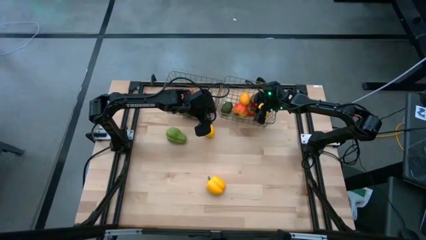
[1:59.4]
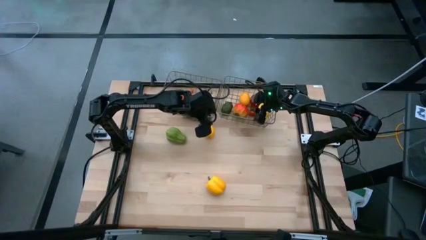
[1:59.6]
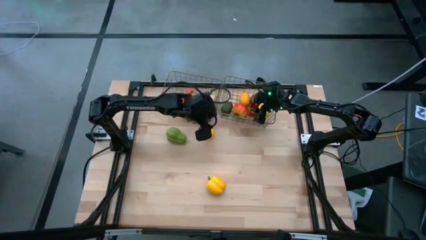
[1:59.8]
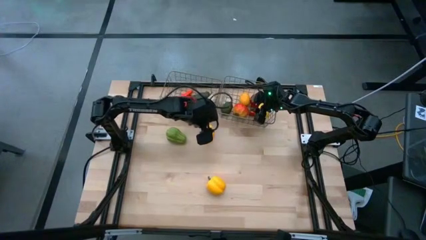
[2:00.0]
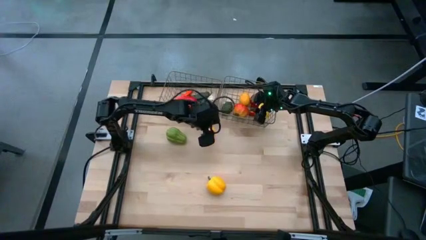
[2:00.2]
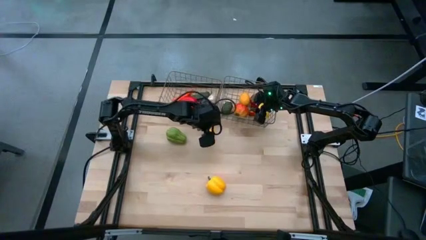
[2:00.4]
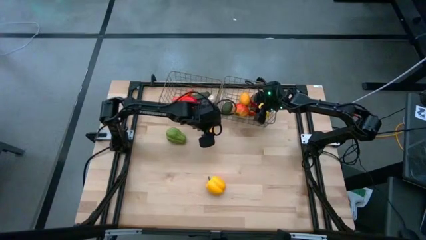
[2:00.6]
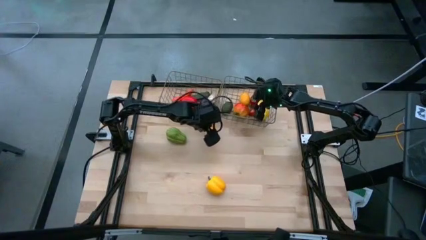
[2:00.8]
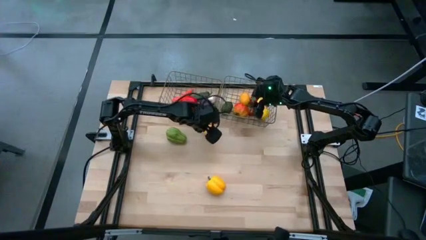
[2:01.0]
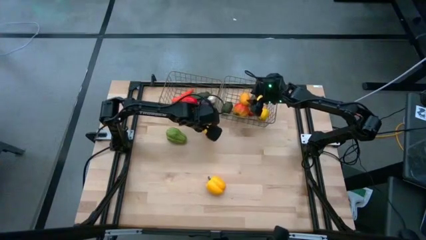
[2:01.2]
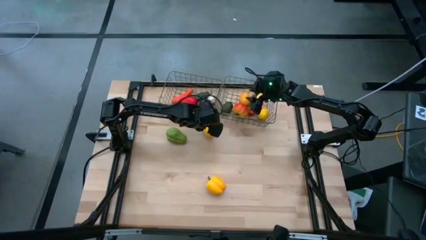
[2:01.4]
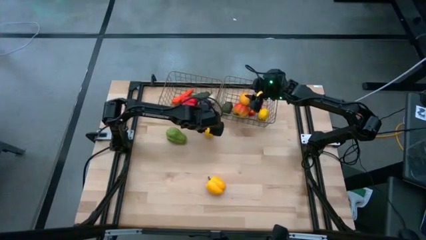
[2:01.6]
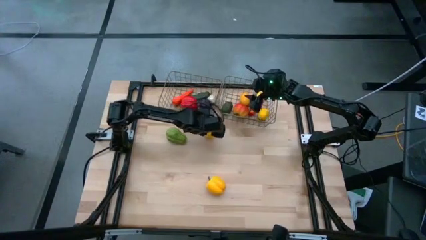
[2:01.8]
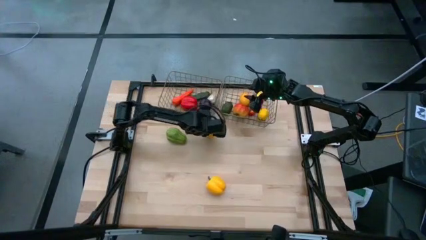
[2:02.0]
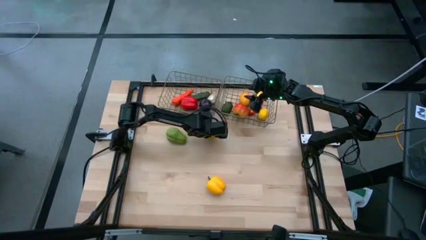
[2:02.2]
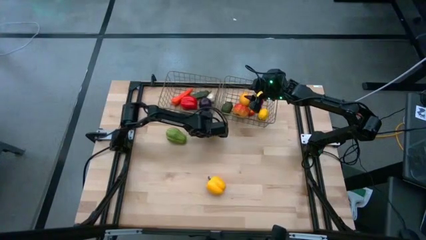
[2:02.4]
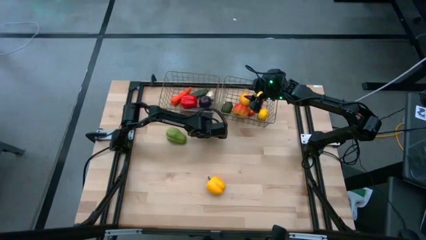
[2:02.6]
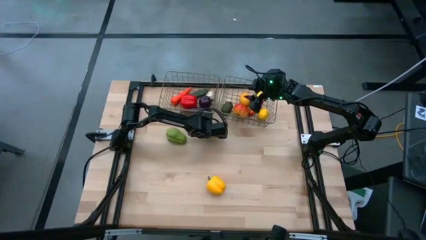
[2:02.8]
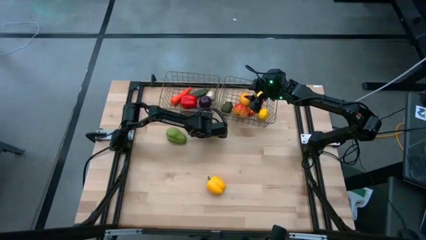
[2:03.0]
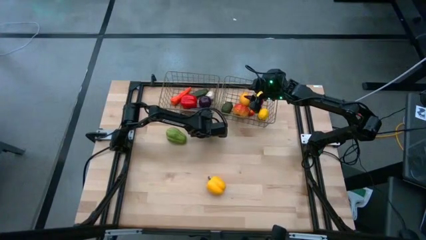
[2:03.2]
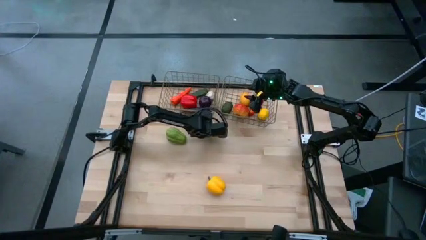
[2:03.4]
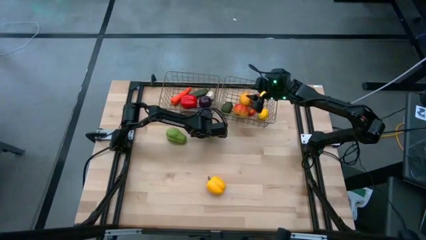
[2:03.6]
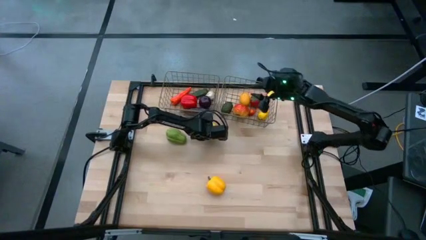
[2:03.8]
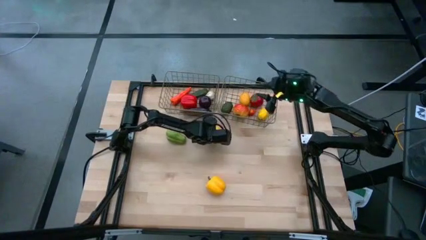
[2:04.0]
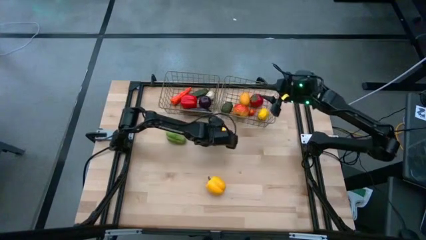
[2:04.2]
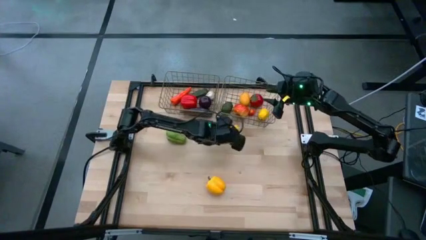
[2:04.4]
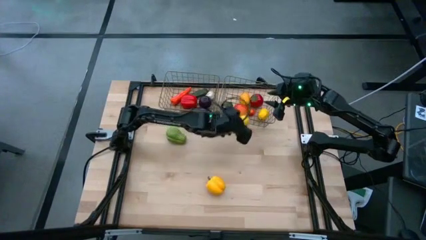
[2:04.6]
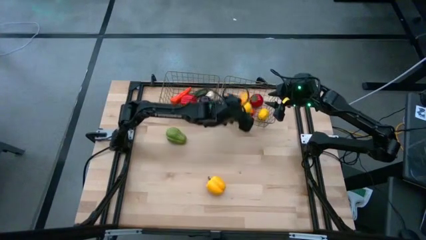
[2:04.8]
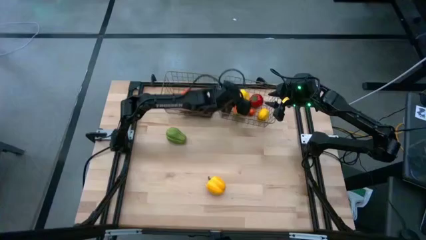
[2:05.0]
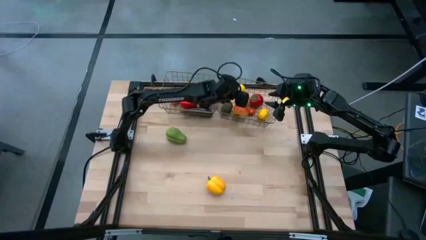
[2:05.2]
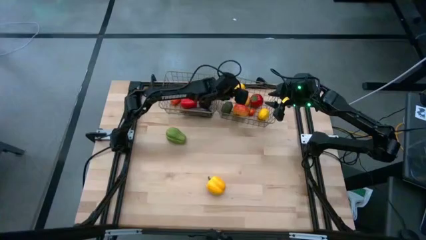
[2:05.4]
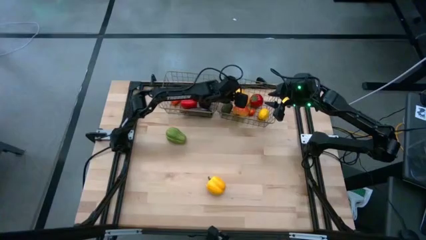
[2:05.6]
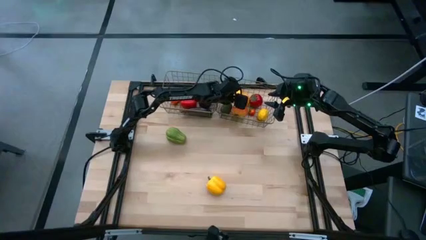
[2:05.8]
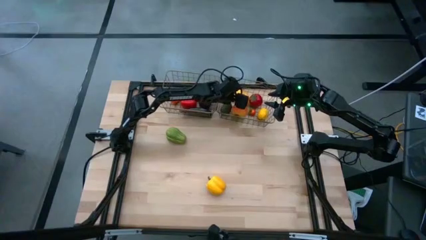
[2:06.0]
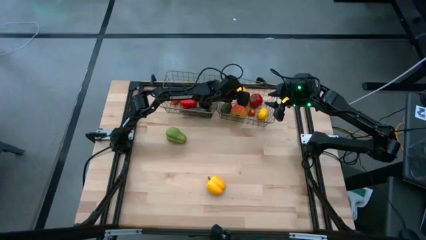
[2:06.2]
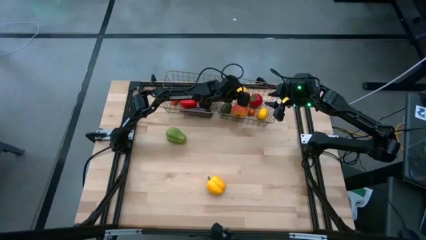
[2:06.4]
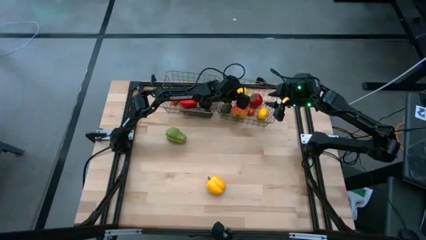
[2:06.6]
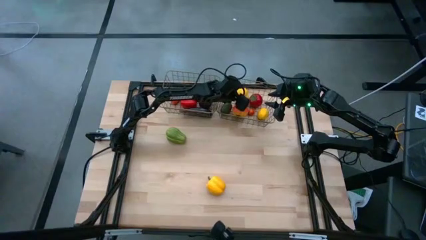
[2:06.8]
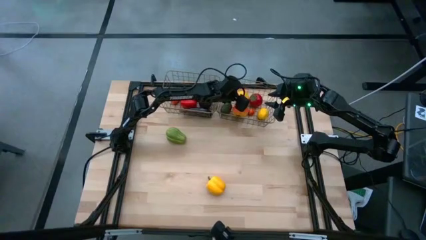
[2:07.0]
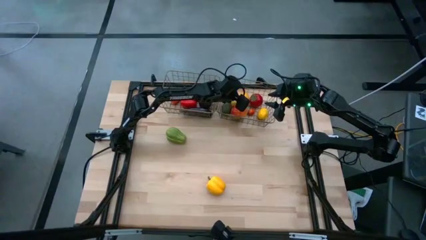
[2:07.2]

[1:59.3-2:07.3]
Task: Sort produce into baskets
Put the yellow lemon into the right golden wire basket

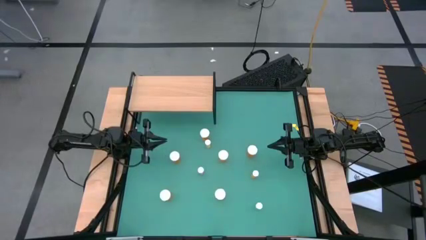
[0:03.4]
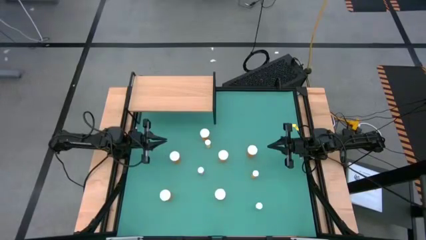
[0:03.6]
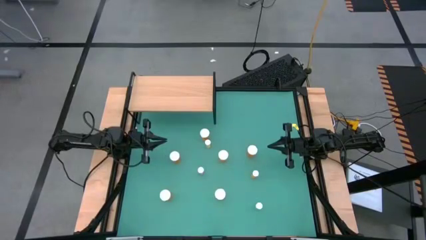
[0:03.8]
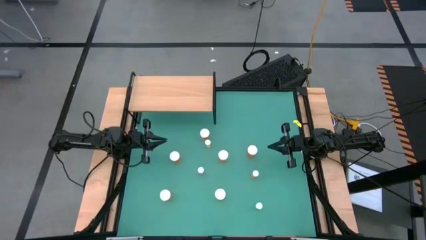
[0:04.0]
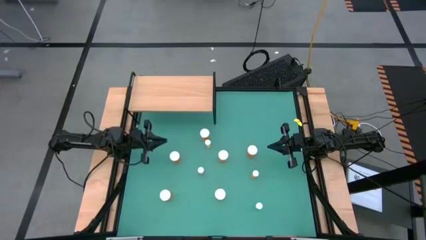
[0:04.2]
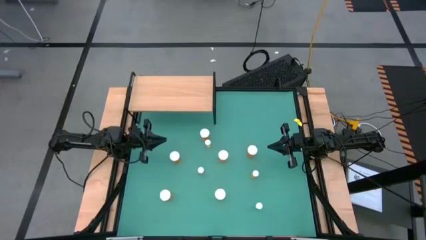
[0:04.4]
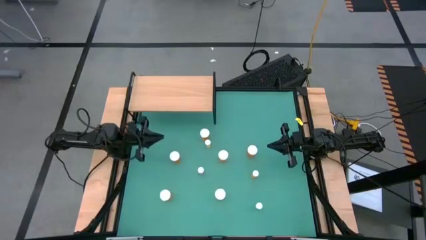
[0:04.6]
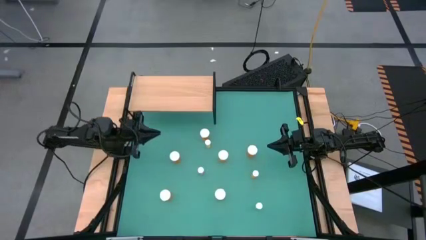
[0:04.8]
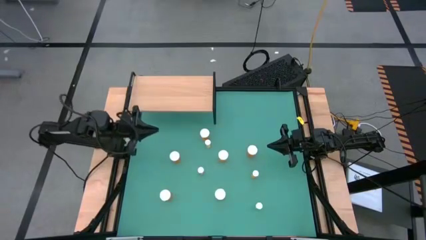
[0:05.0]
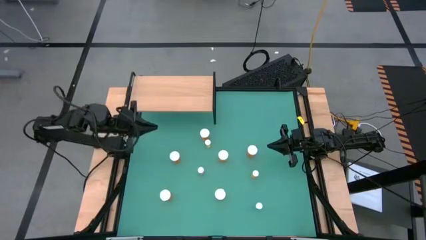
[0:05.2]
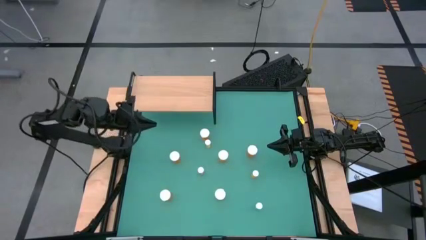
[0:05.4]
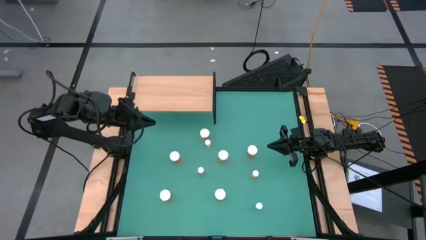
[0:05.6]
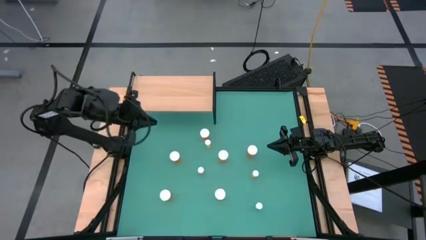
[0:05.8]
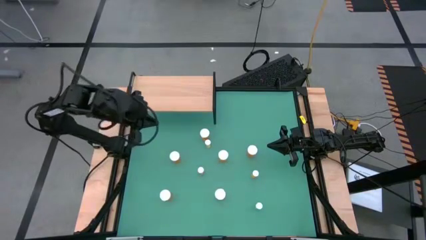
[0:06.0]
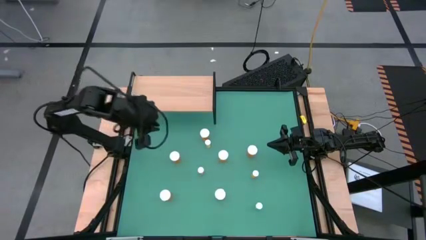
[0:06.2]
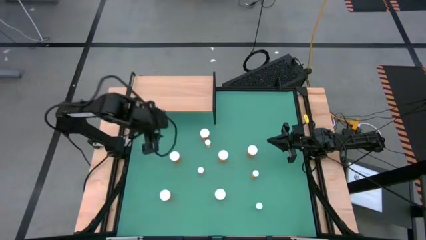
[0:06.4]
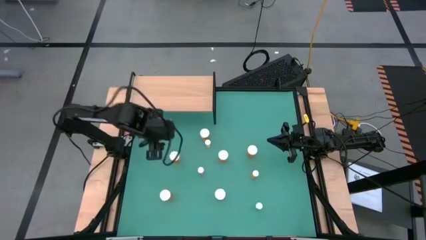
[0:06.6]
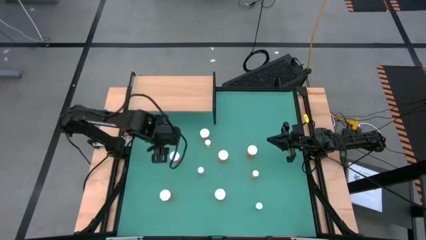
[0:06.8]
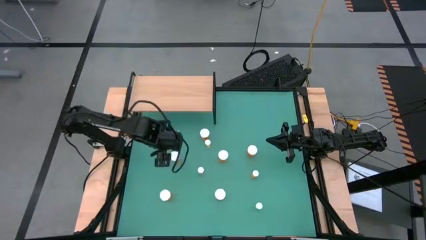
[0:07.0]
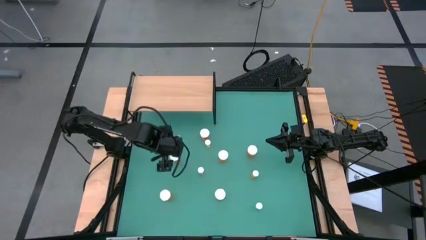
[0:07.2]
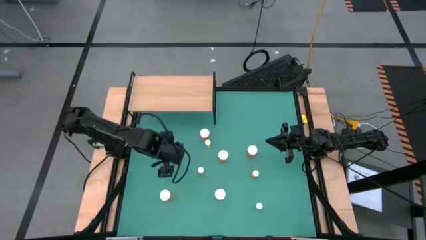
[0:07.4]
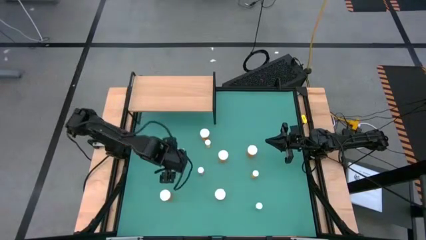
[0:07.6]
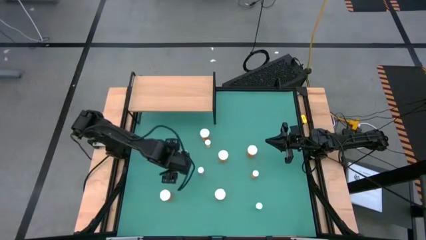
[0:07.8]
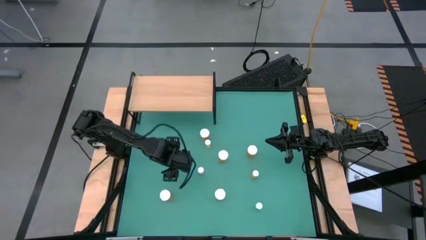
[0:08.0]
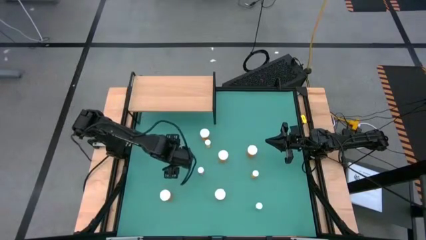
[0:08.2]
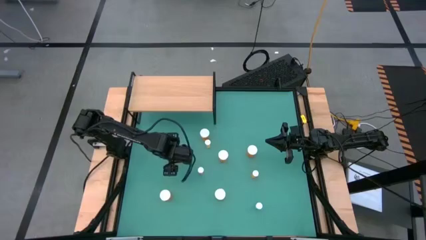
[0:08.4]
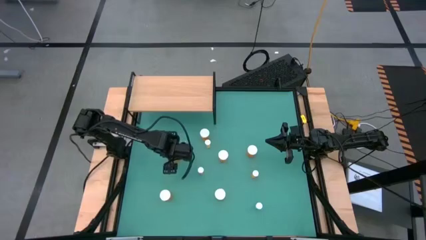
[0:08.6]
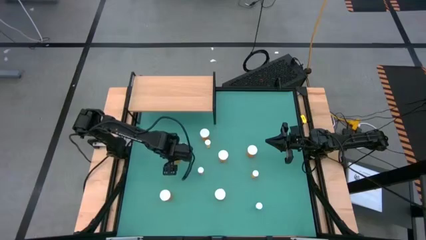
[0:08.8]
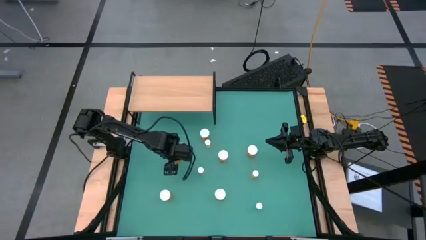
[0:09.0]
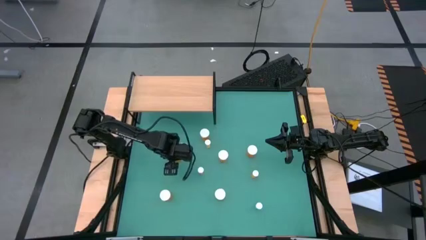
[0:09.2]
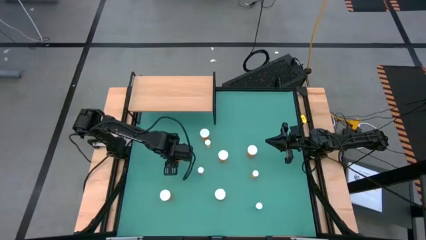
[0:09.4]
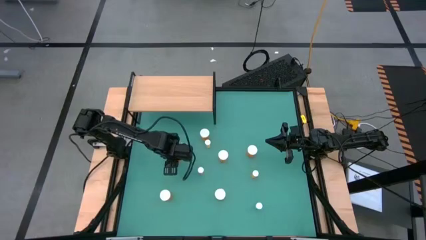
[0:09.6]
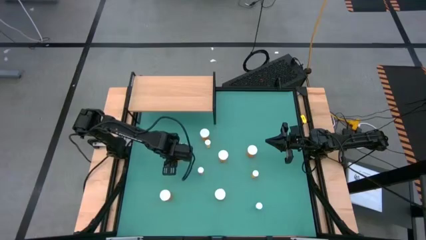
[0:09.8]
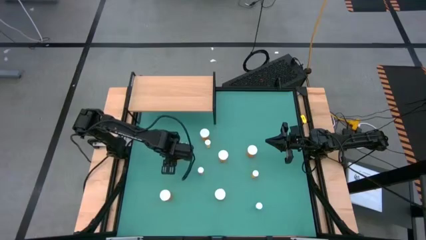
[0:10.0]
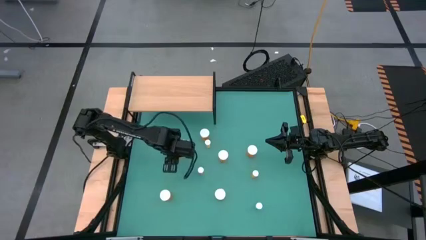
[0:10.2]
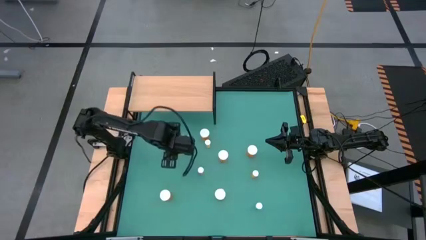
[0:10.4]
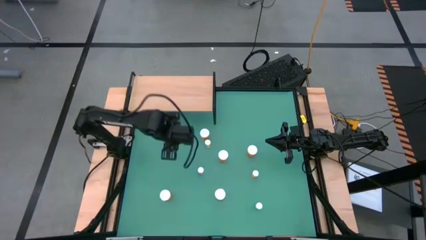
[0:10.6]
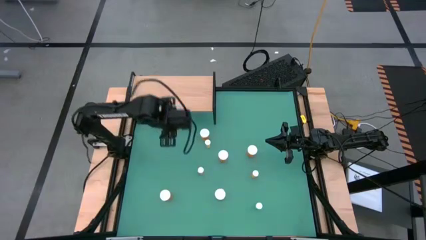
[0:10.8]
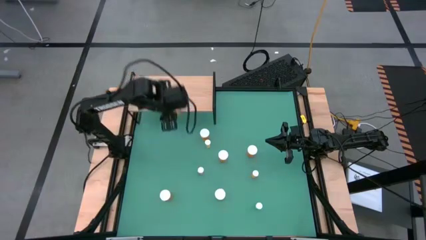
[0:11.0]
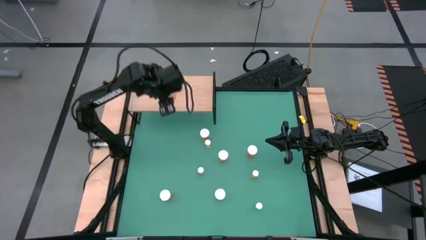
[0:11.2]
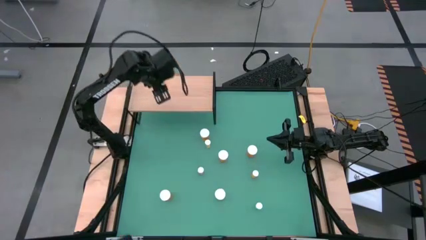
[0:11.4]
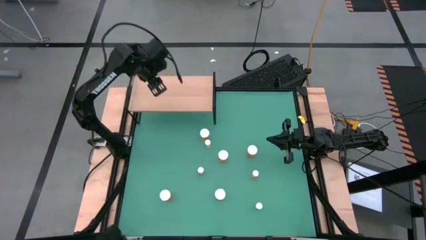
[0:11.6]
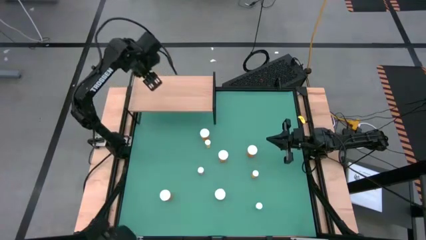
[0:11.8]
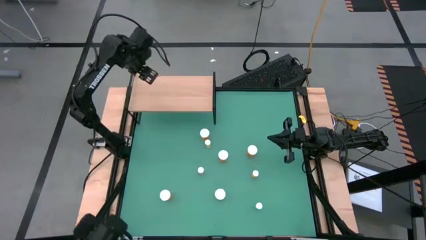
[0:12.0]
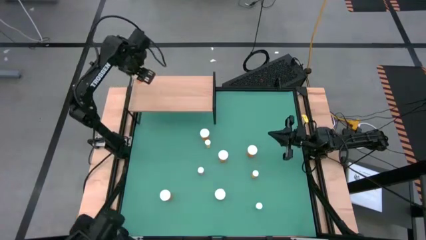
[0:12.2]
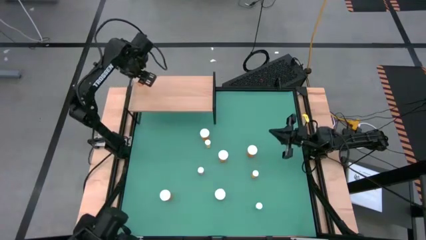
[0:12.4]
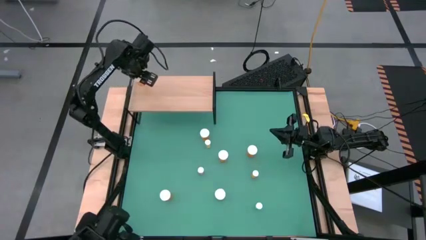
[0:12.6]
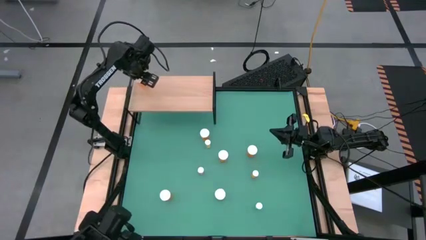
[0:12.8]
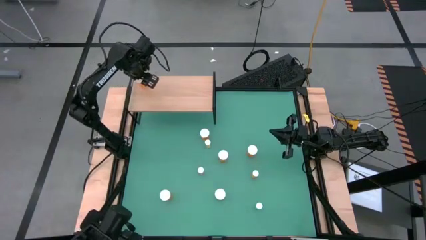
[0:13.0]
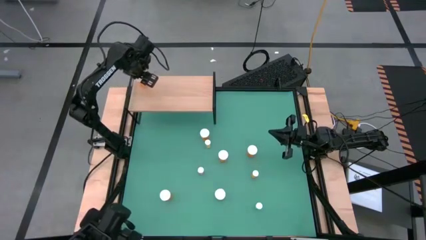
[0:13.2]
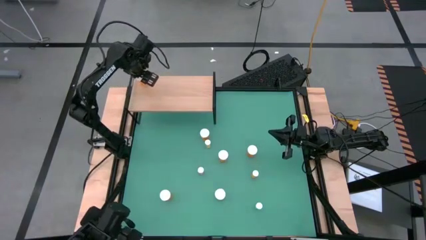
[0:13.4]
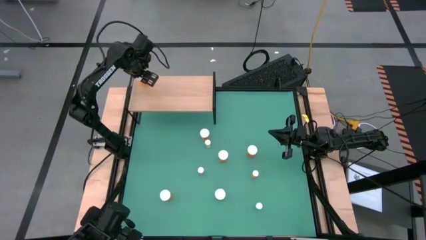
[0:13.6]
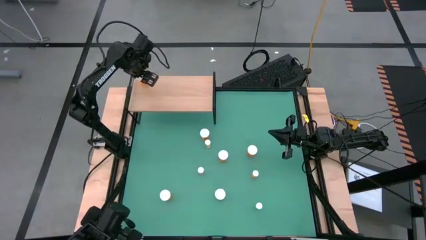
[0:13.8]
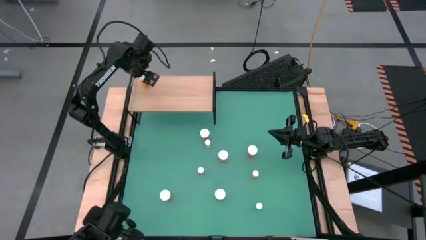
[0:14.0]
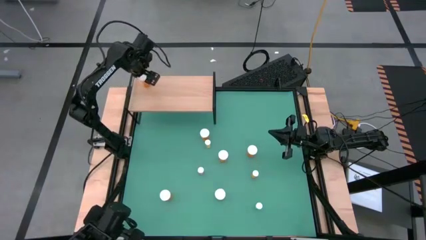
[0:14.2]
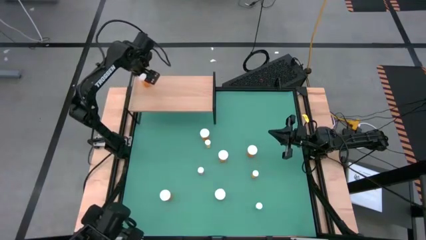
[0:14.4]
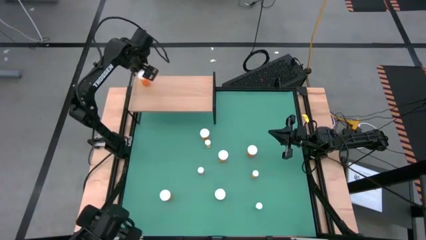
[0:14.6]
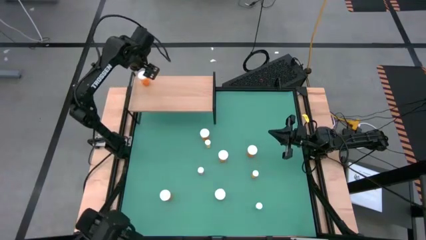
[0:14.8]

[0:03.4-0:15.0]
Task: Pick and place medicine bottles onto shelf by color
Put the big orange pill bottle on the shelf
